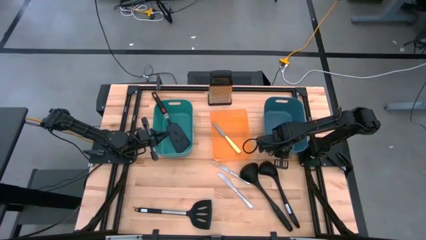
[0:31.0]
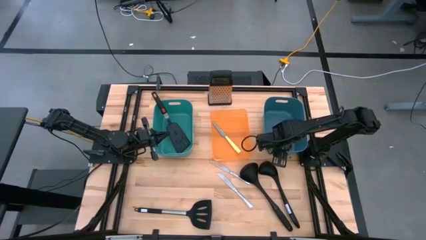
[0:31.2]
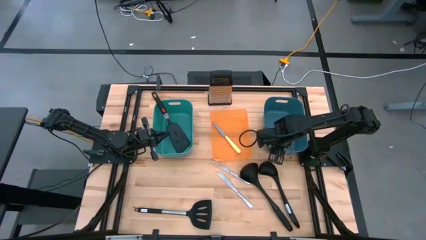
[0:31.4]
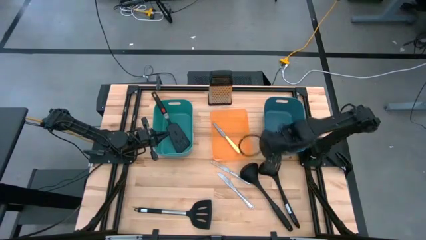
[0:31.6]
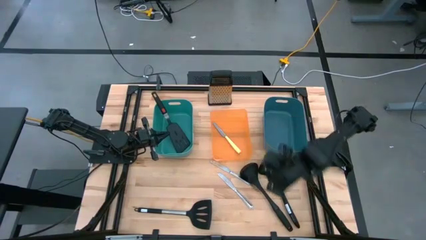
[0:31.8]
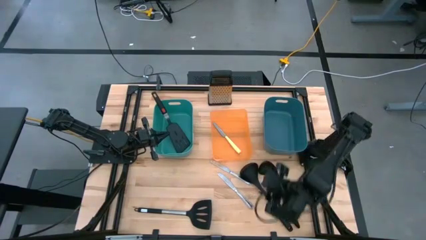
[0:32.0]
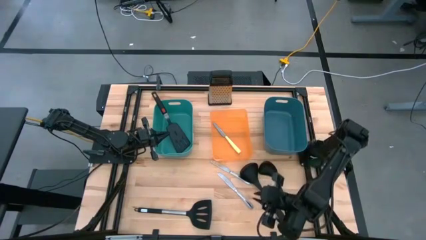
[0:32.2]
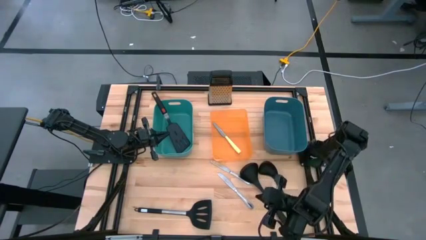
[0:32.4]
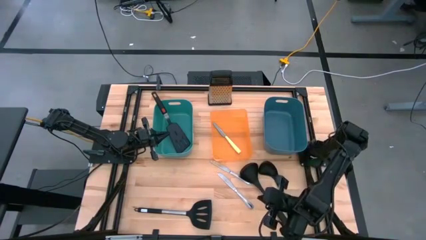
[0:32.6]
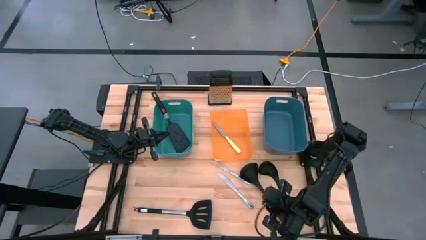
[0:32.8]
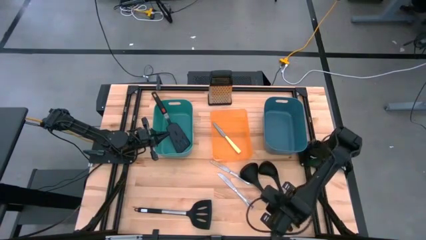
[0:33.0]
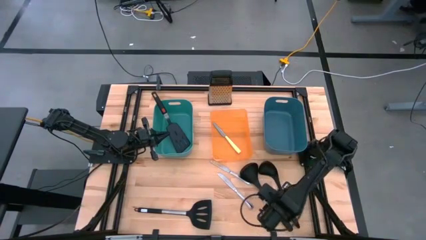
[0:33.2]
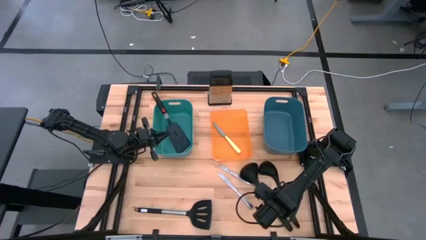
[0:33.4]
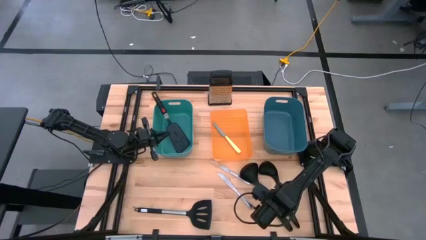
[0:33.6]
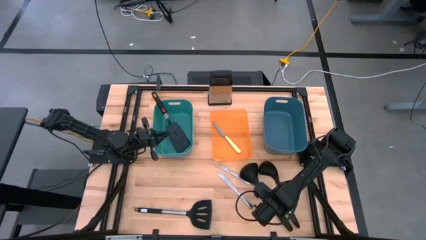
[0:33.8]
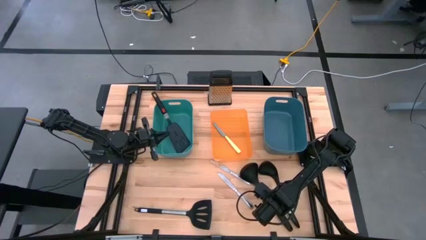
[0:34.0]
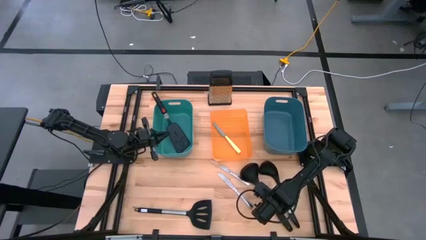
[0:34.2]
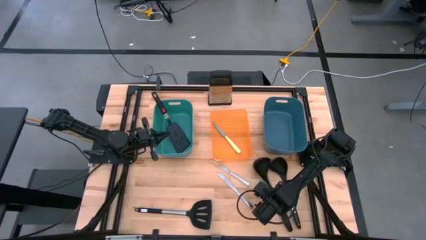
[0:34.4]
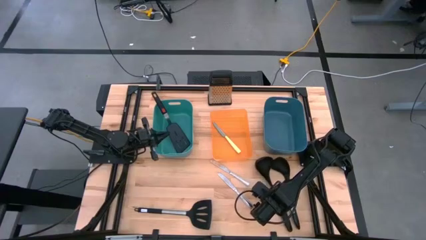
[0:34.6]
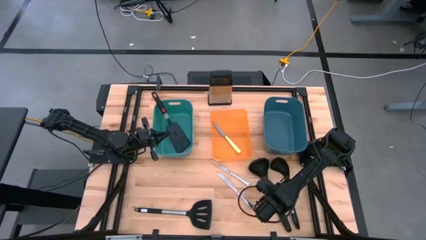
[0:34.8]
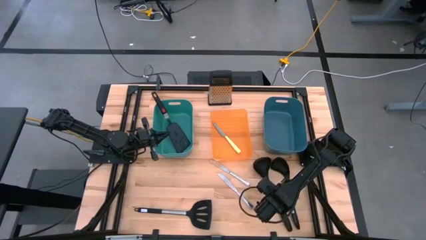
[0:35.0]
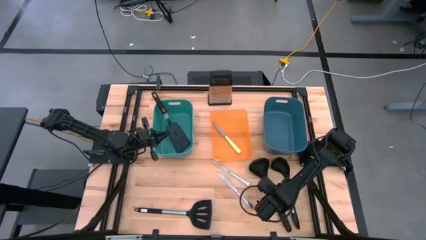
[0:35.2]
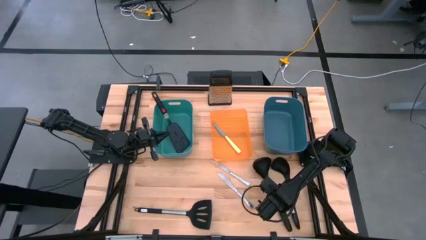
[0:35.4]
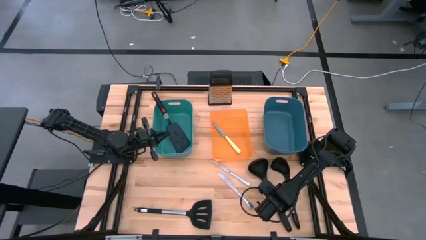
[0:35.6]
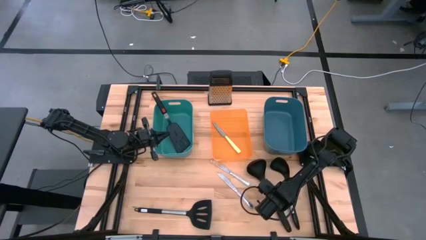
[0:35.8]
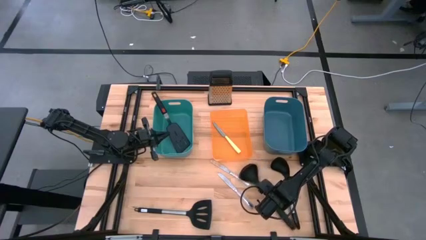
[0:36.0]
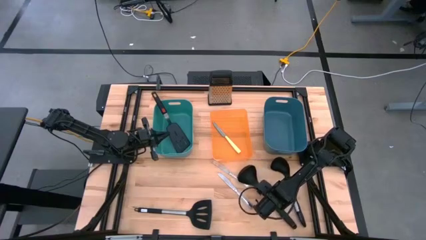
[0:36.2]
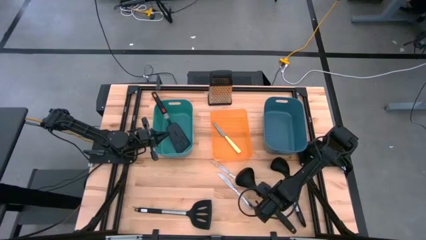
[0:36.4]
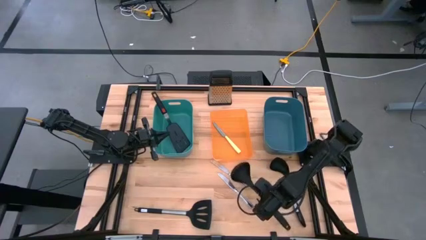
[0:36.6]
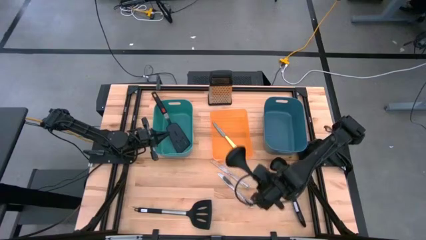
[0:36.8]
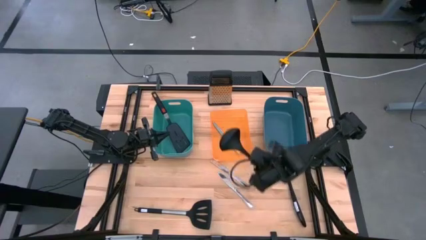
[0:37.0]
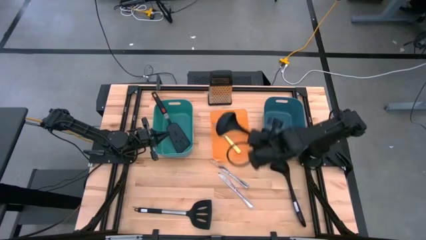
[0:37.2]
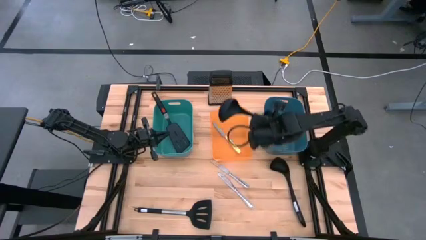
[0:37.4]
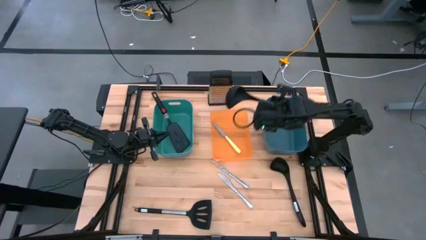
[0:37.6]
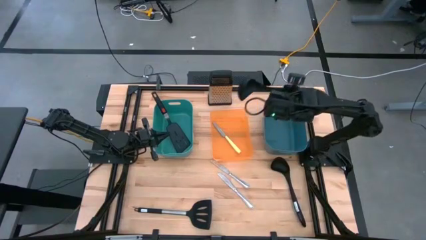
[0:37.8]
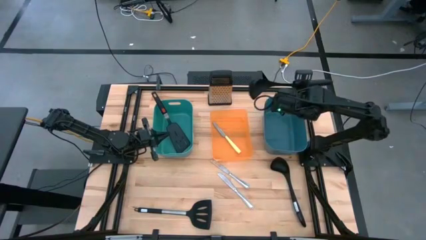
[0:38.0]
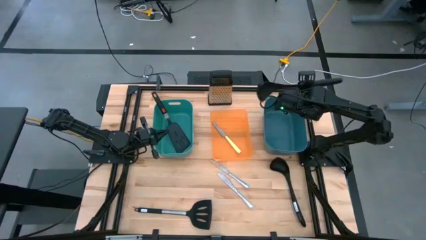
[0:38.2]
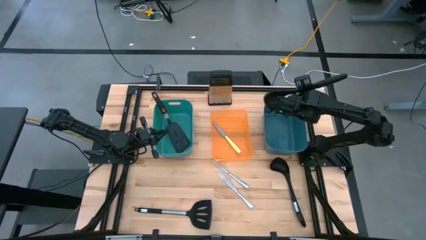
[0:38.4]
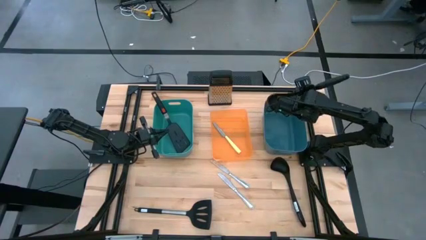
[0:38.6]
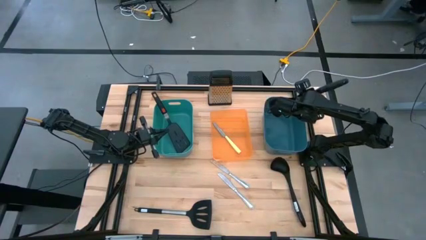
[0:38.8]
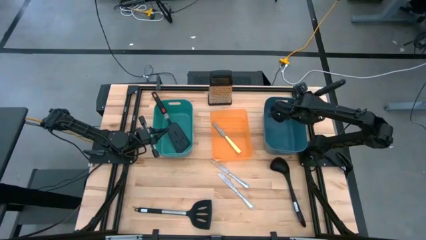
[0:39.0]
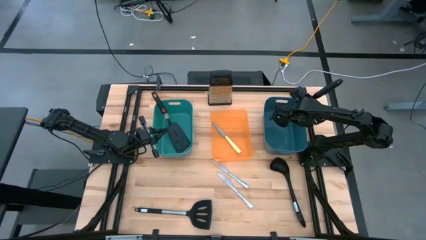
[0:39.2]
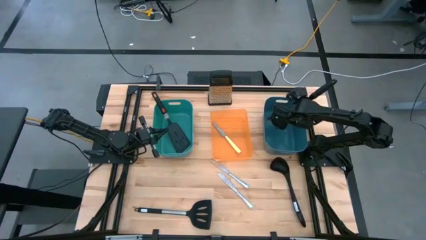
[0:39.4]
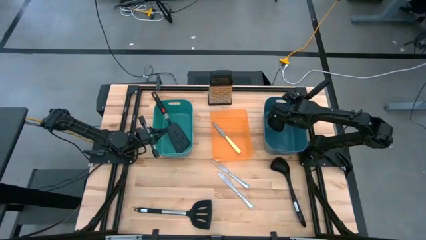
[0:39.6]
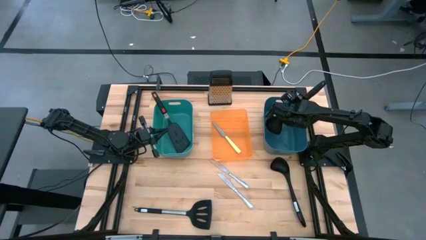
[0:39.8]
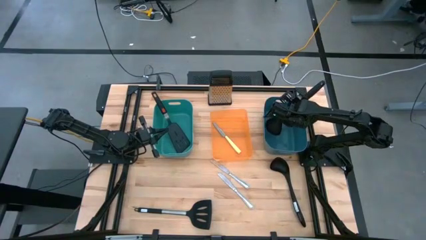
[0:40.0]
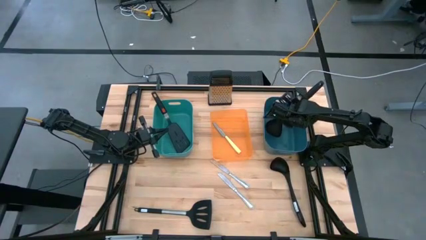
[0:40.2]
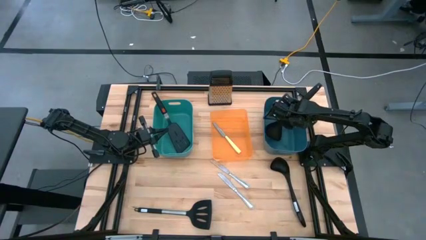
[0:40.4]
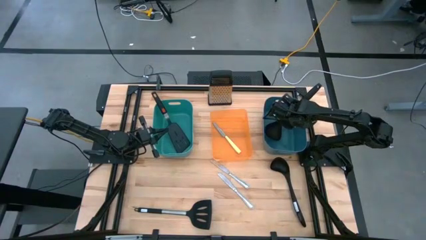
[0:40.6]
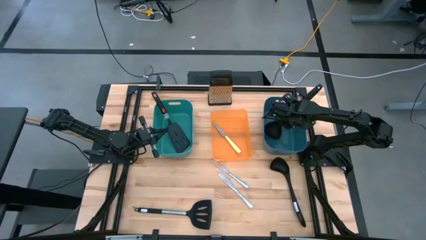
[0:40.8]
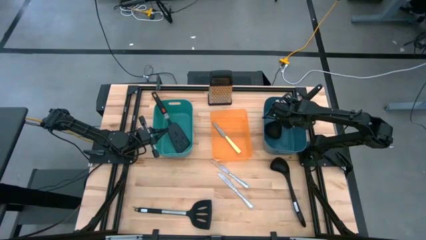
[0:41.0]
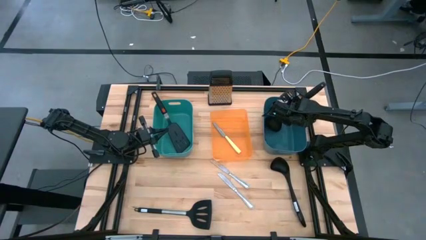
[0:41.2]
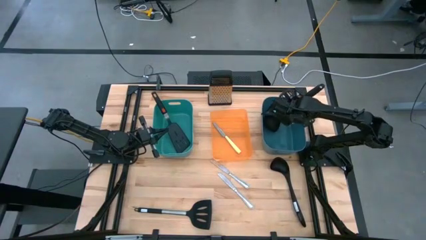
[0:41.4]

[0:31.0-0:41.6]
Task: Pick & Place Kitchen Items
Put the left black serving spoon into the blue bin

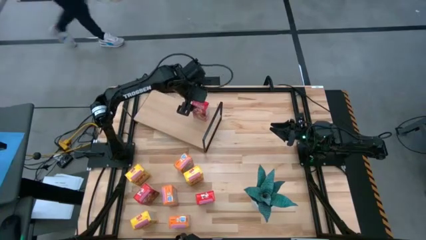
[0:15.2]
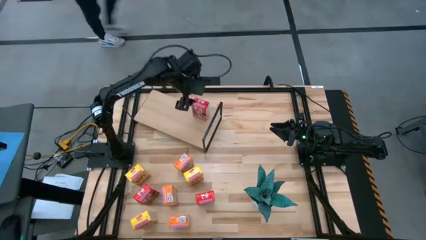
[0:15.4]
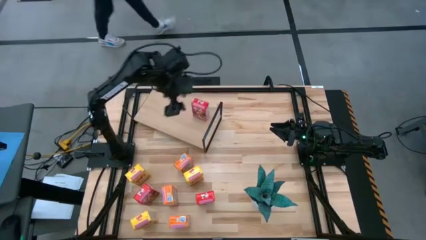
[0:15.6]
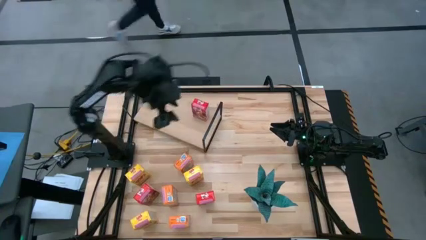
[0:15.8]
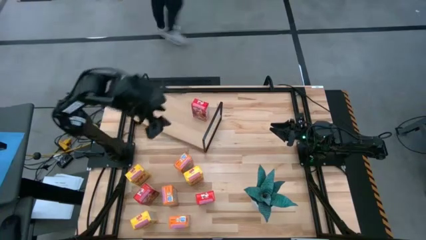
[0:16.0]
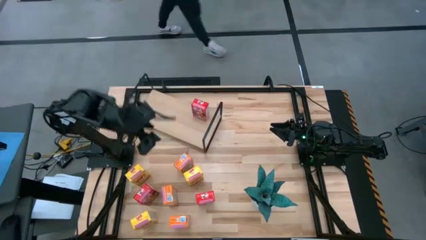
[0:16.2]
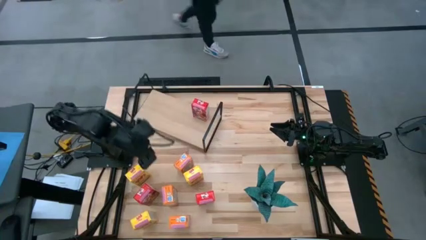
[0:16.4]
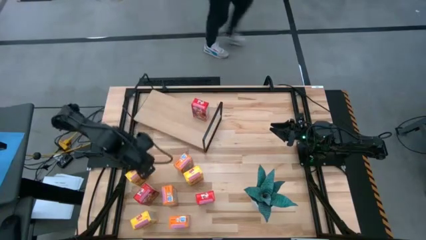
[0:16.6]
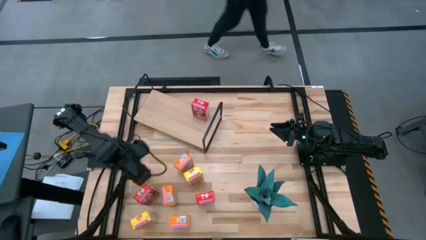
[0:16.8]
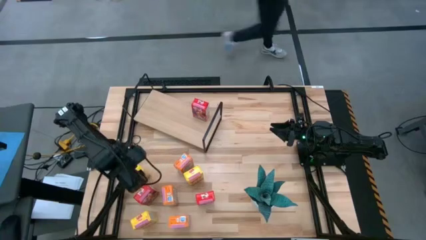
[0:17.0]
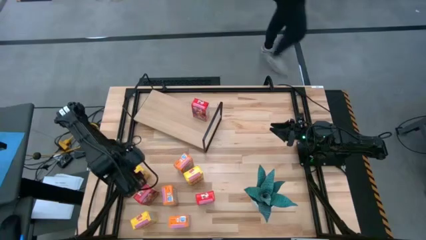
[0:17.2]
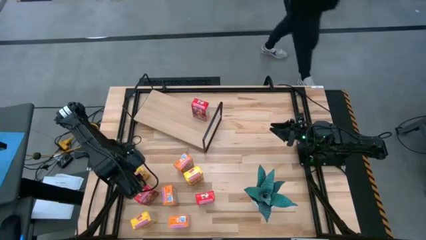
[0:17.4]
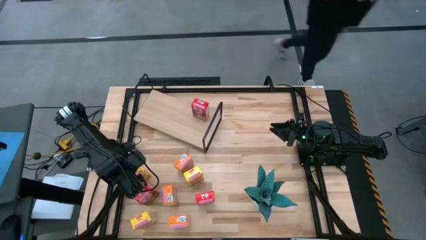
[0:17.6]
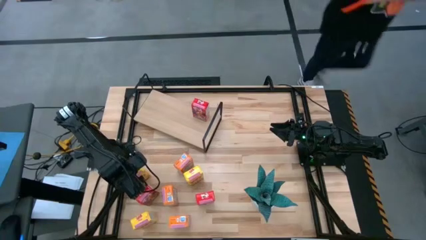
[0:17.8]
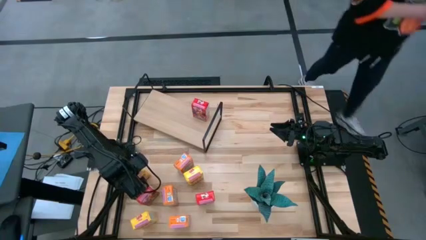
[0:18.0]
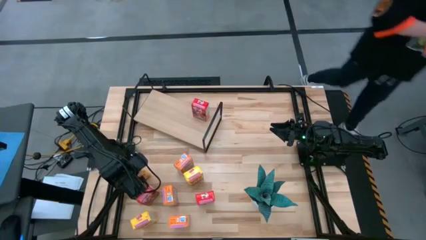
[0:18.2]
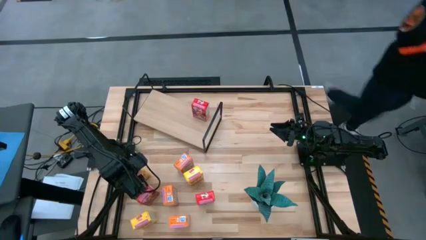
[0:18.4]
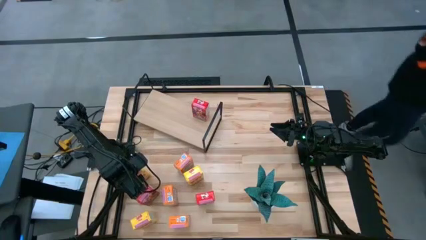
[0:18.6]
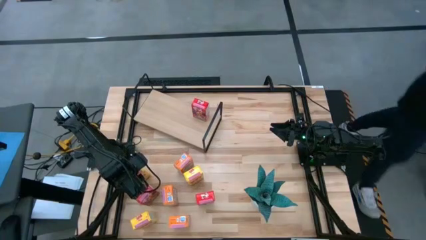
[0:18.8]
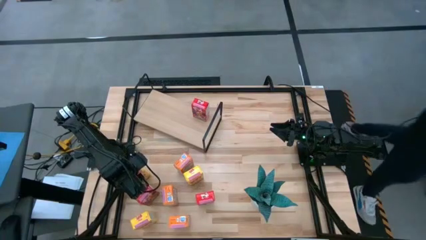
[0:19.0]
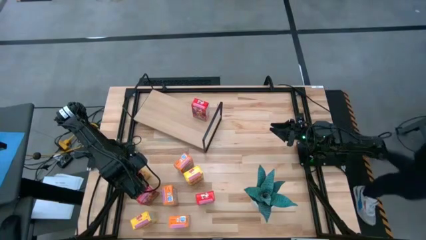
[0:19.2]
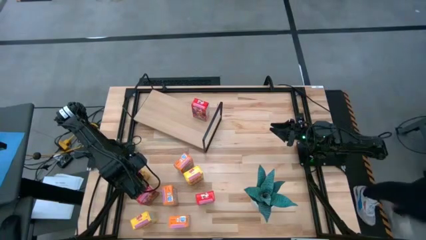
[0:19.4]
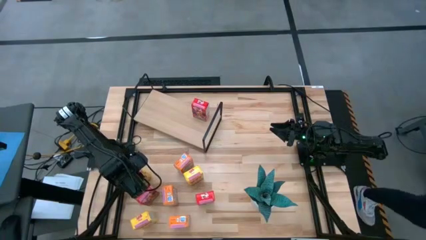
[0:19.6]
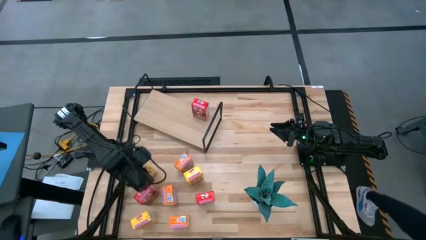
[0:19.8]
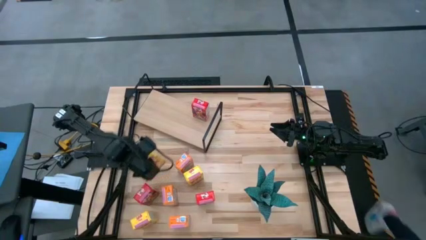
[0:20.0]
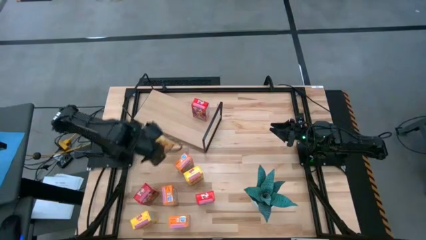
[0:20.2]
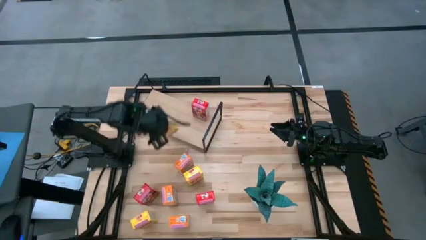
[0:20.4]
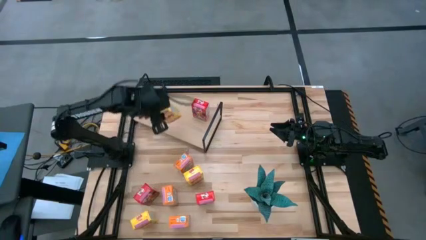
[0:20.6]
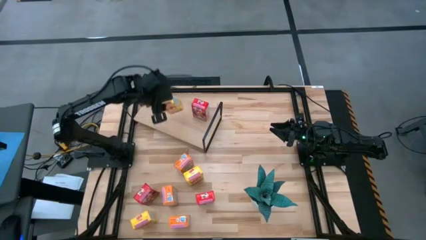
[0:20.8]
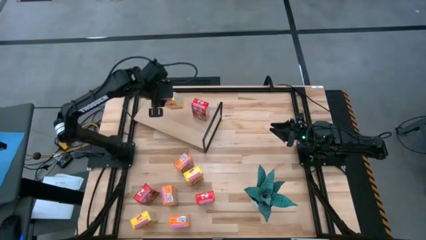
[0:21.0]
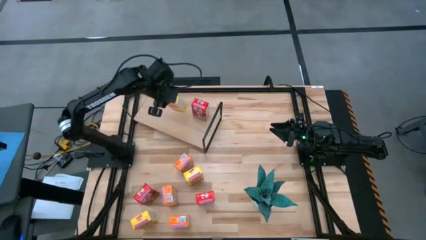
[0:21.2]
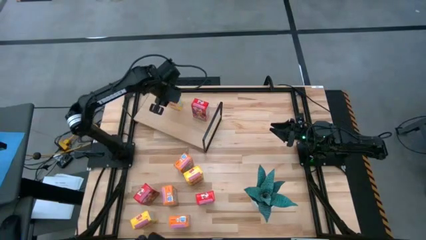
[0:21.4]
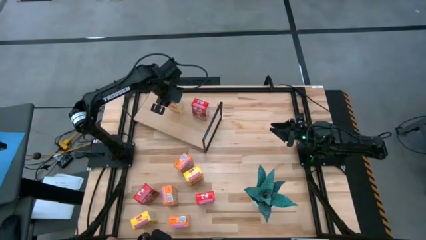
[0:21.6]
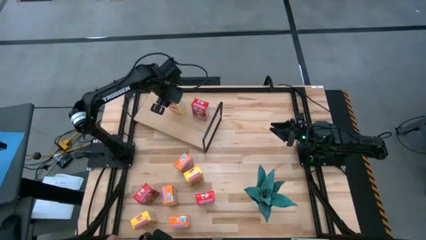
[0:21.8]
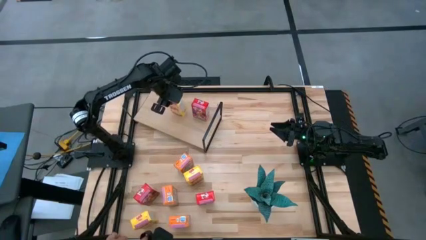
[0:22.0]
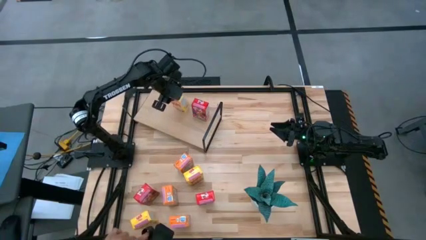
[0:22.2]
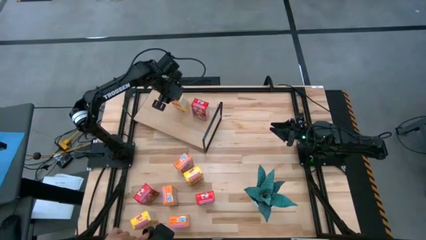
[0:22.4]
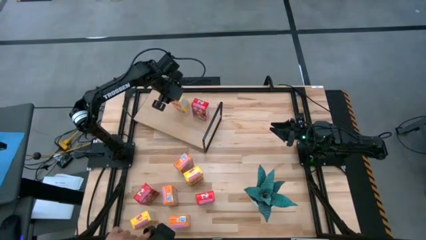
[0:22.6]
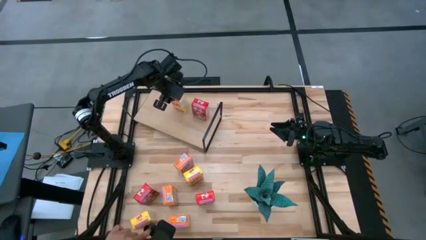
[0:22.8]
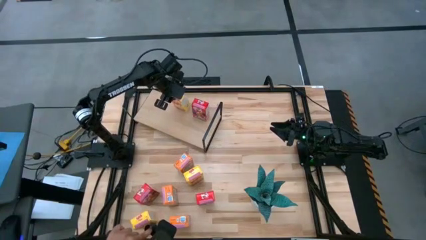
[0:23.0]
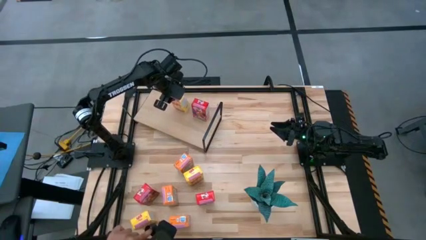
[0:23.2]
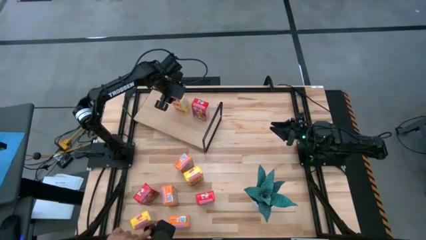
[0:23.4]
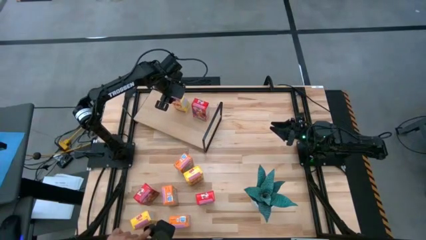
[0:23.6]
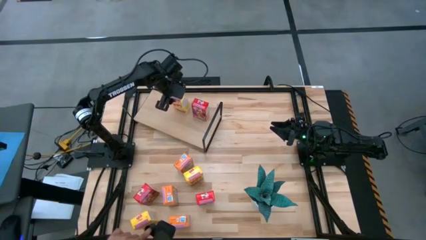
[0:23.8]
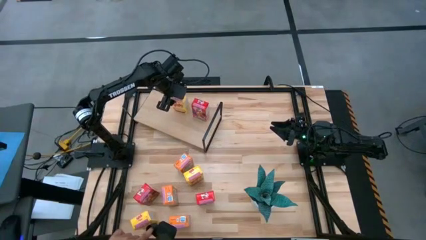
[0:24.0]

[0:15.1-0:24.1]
Task: Stack cereal on shelf
Put the top left yellow cereal box on the shelf
